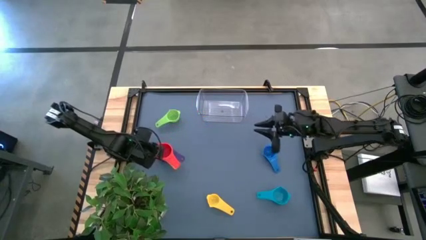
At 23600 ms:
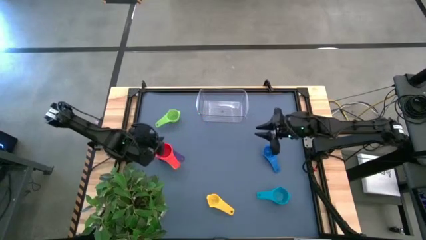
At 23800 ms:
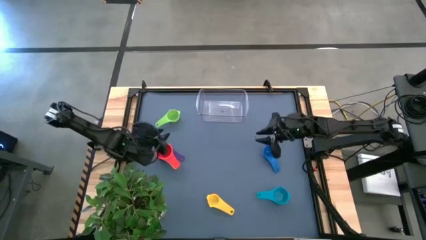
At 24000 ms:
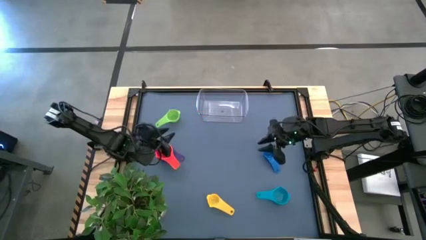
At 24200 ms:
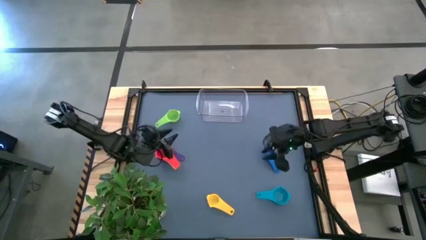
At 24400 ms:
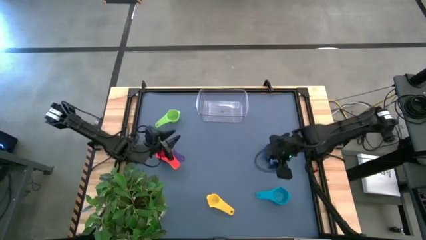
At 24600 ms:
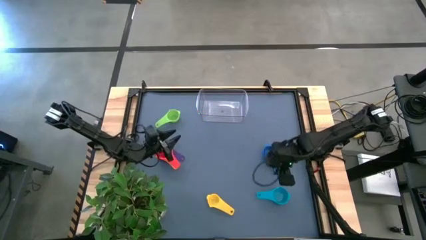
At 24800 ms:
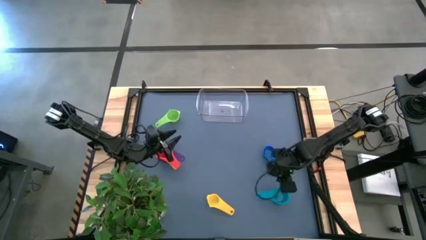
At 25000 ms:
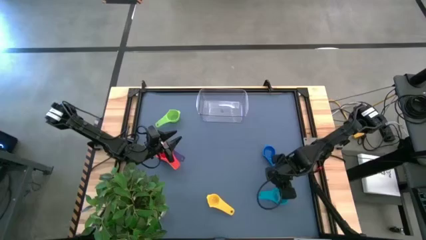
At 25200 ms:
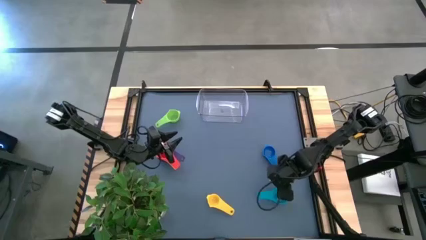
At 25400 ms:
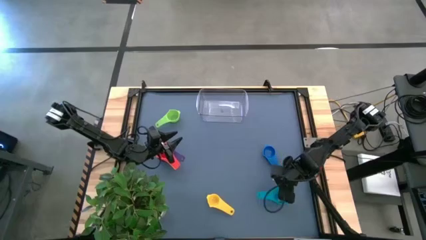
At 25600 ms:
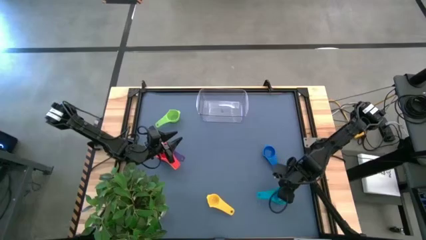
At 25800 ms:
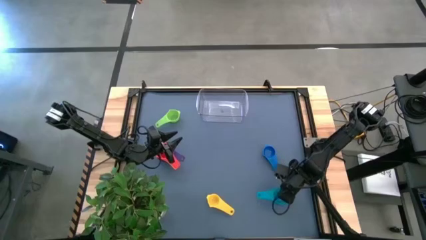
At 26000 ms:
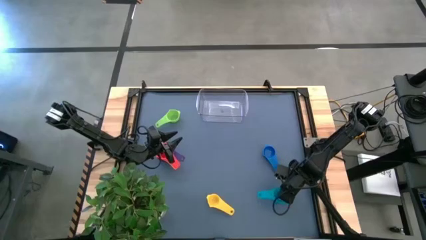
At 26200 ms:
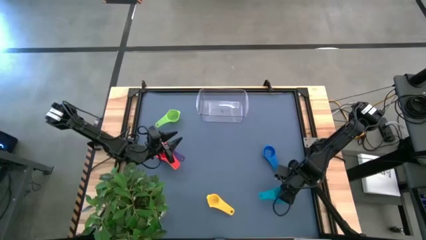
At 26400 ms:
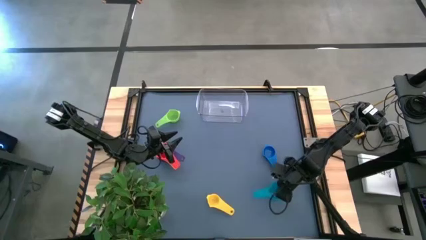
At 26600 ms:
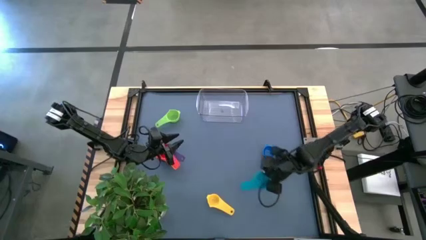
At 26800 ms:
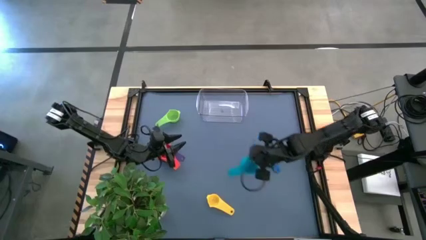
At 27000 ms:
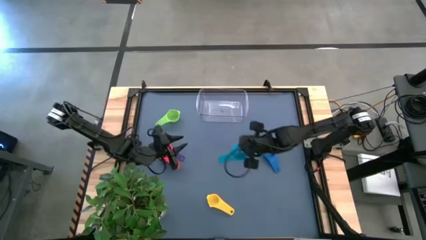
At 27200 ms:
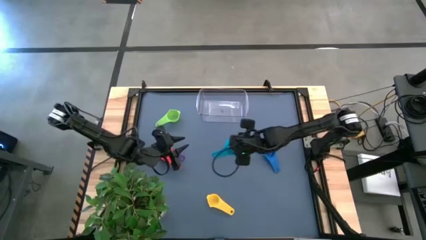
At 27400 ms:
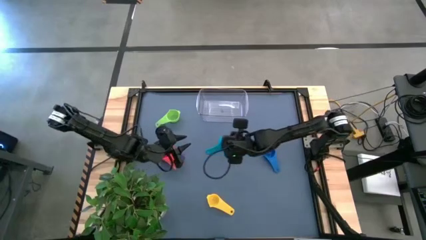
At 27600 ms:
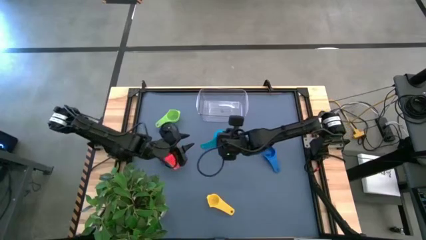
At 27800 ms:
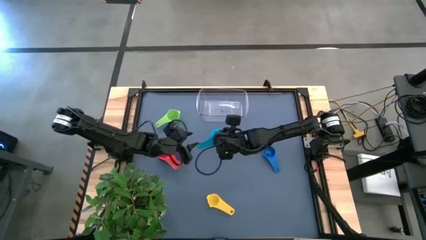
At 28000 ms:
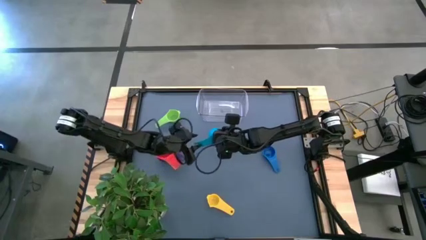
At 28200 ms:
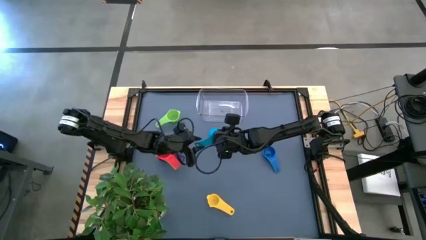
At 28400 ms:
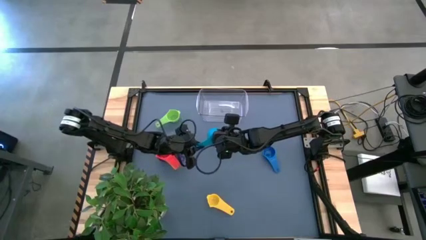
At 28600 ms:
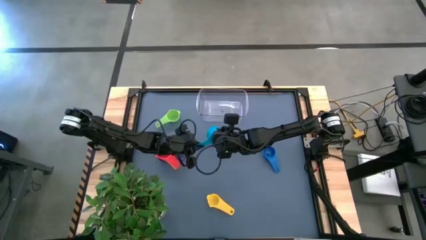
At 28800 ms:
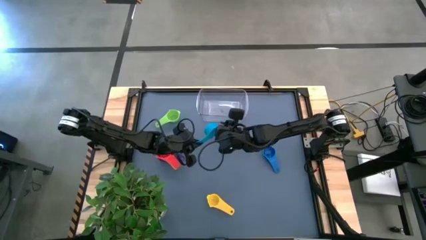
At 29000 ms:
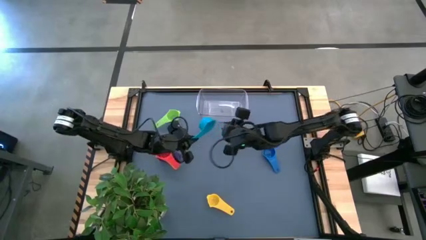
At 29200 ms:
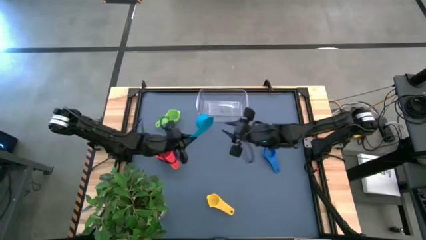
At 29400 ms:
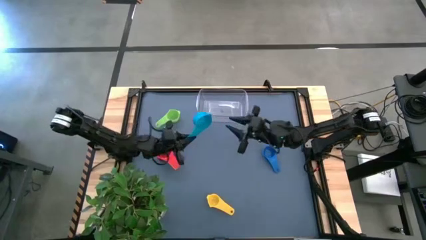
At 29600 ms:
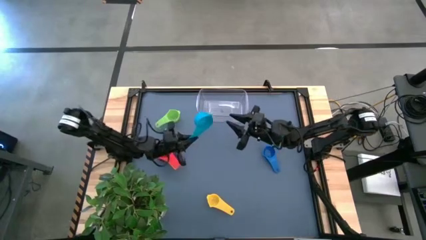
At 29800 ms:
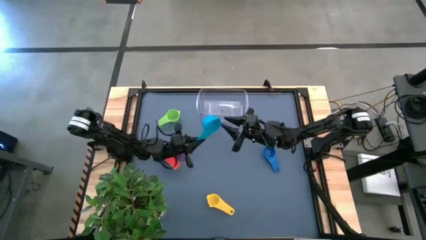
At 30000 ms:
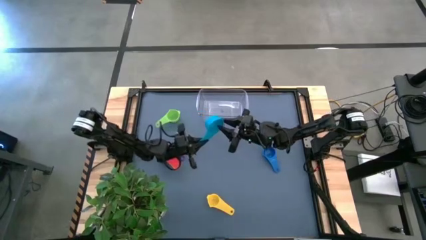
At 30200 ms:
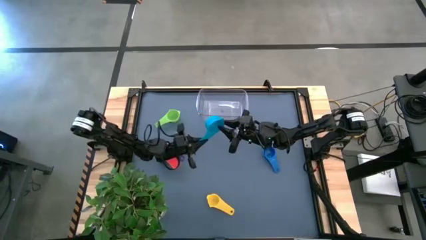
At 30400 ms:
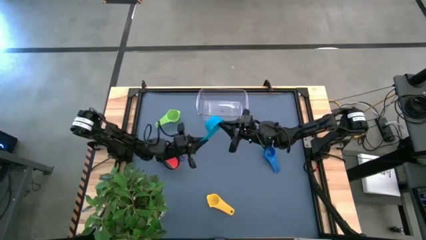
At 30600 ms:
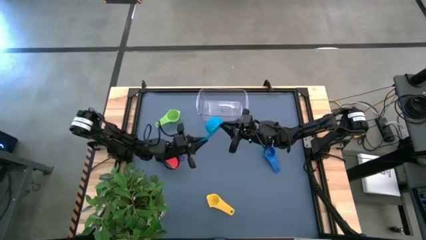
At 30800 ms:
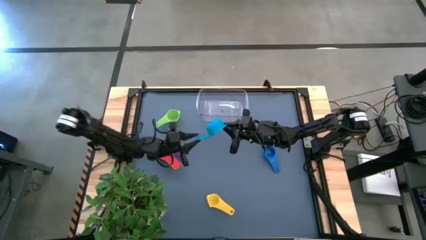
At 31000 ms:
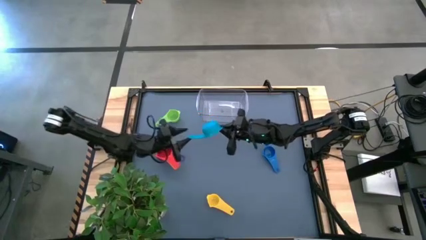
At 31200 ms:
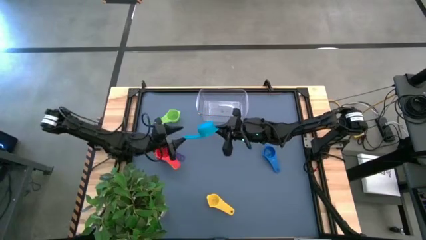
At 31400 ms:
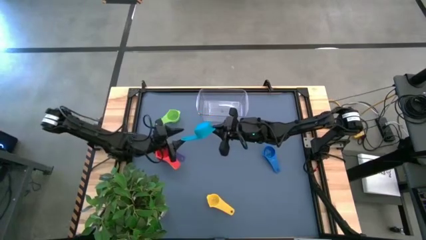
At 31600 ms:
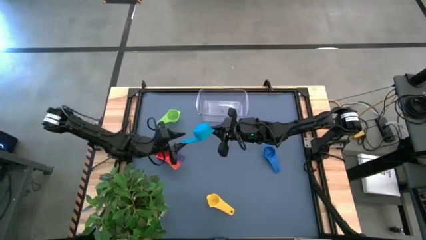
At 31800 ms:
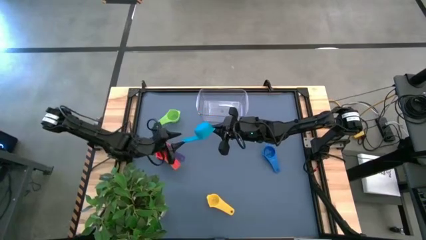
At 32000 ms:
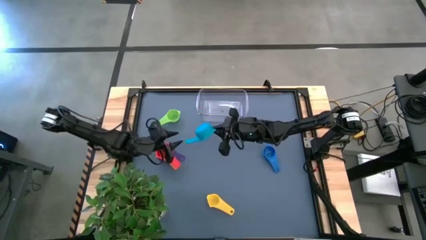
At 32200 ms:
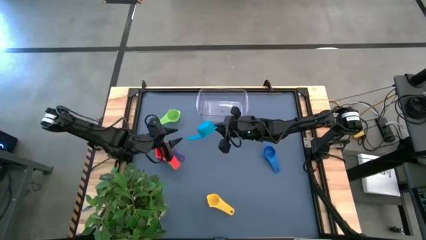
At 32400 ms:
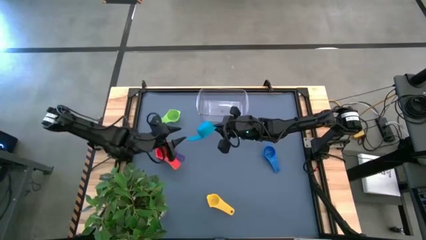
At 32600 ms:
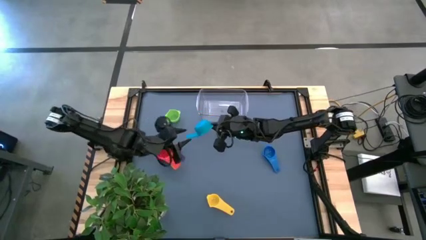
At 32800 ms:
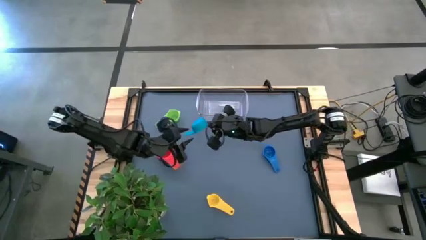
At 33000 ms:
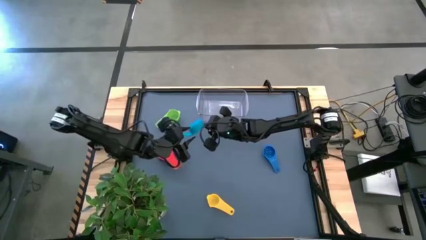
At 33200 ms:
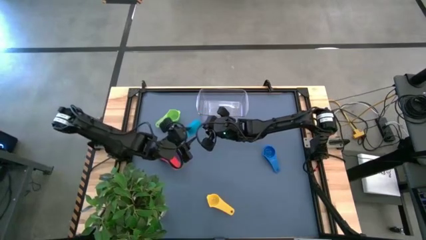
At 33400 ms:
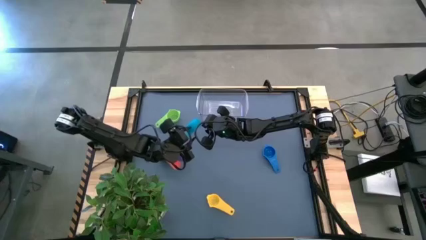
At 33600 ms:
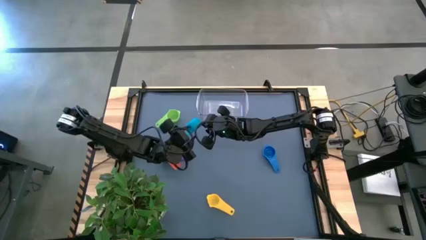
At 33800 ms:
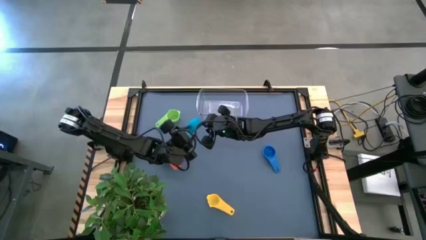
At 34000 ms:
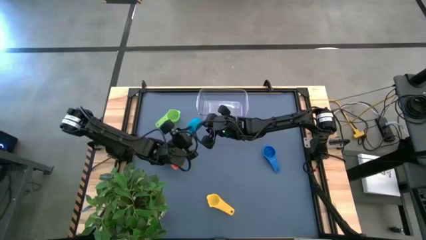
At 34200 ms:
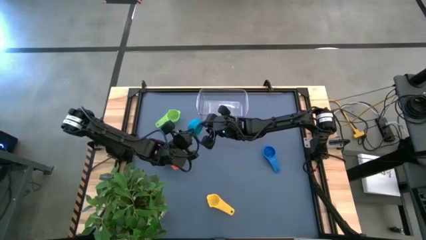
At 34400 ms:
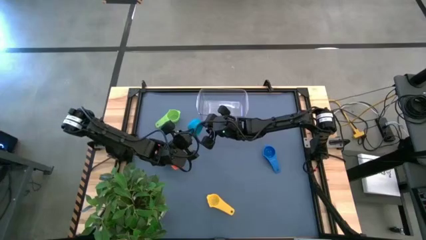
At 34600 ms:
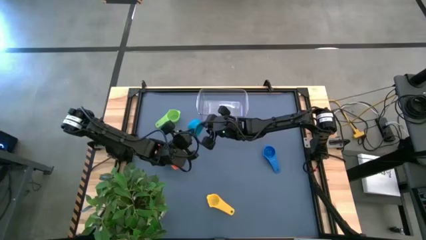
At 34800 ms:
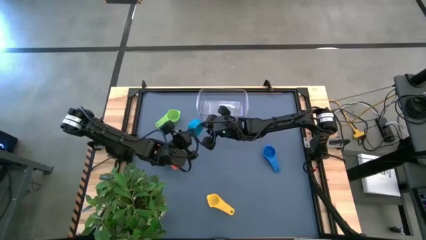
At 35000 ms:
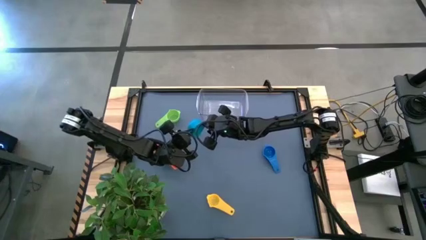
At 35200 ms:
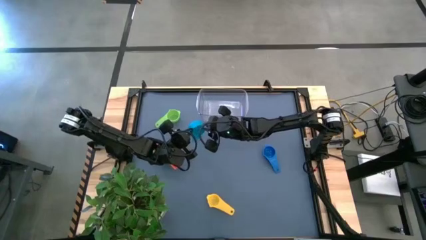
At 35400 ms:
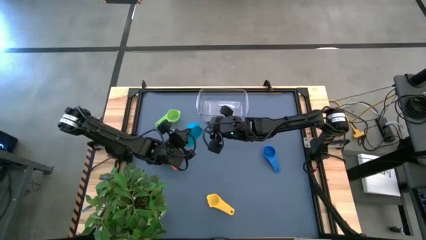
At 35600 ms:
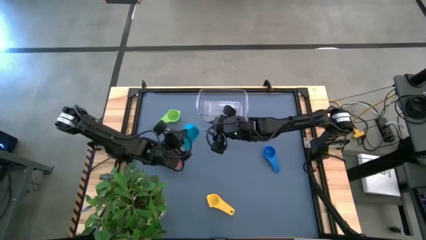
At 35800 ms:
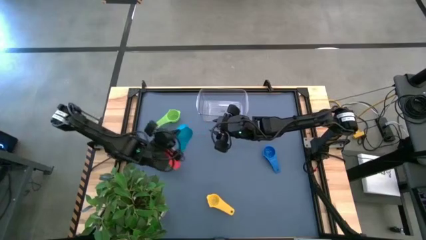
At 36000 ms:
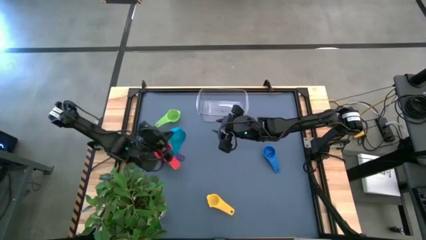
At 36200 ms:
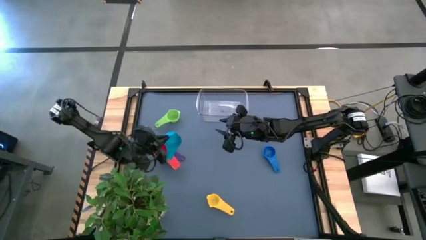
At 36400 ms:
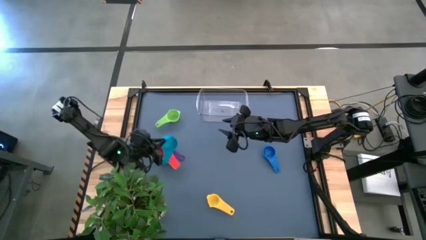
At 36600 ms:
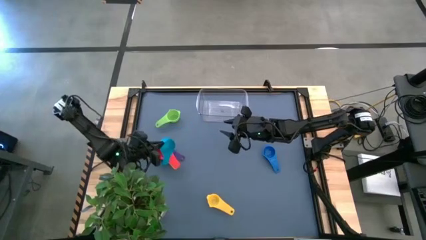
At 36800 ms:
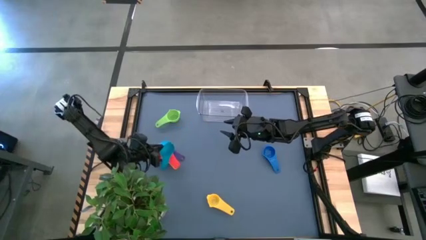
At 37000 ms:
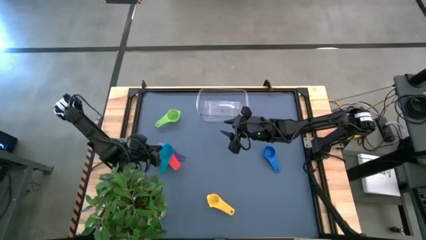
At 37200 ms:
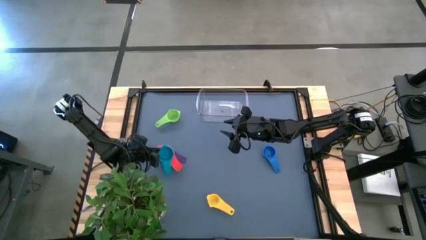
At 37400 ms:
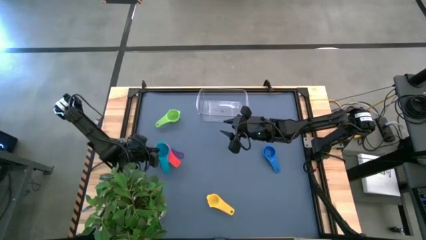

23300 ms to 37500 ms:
Task: Nest measuring cups in basket
Stack the light blue measuring cup on top of the red measuring cup
